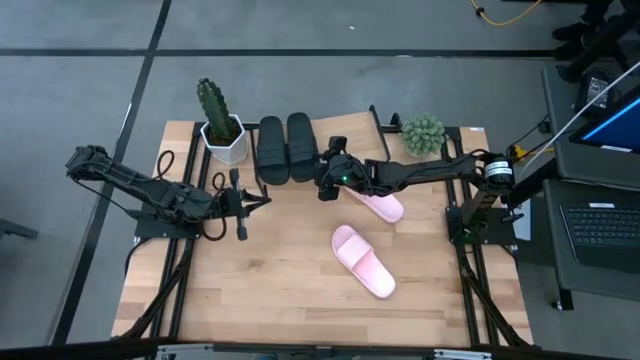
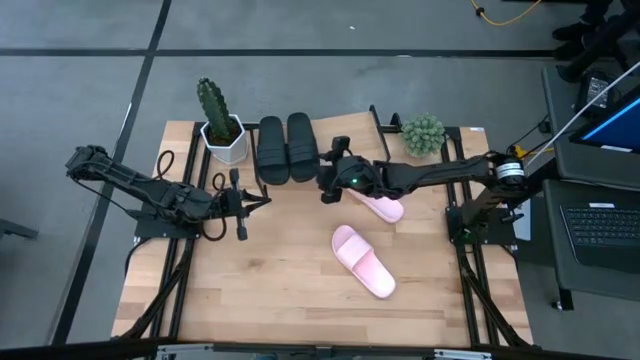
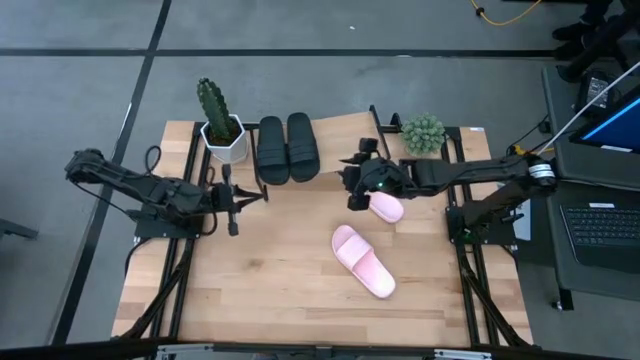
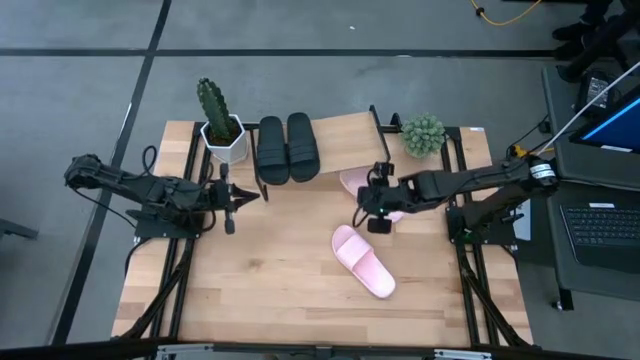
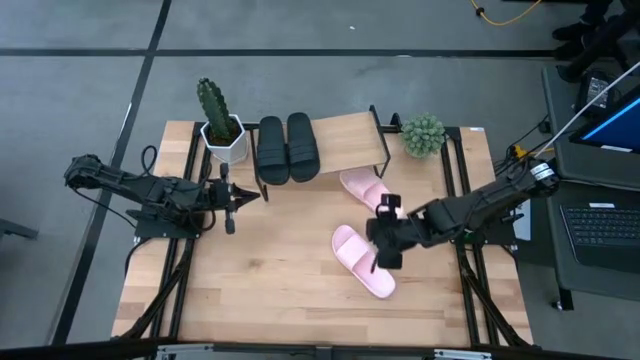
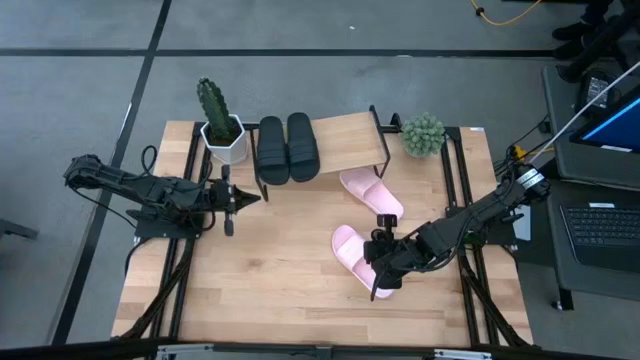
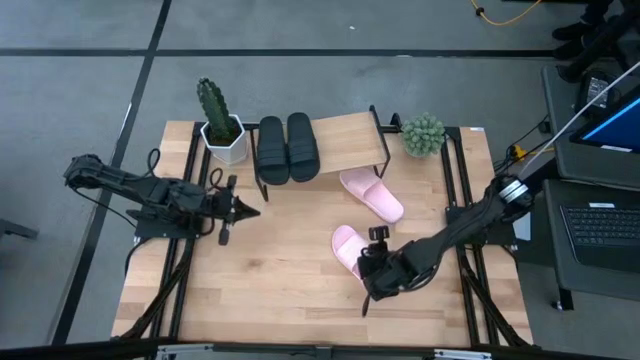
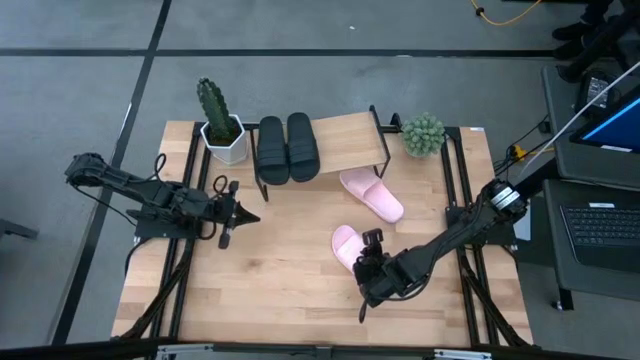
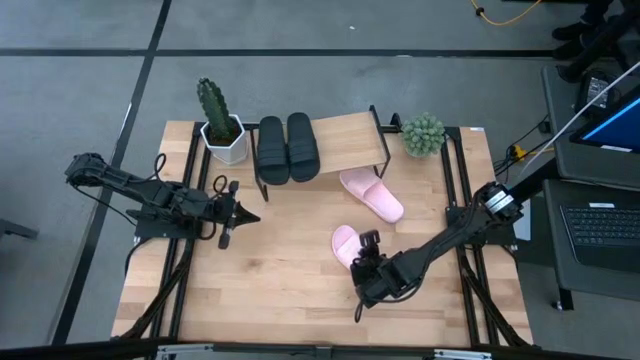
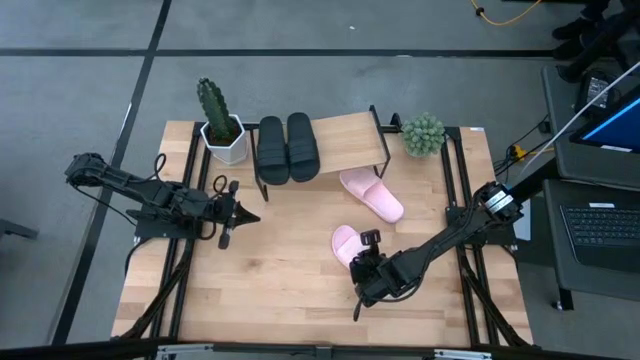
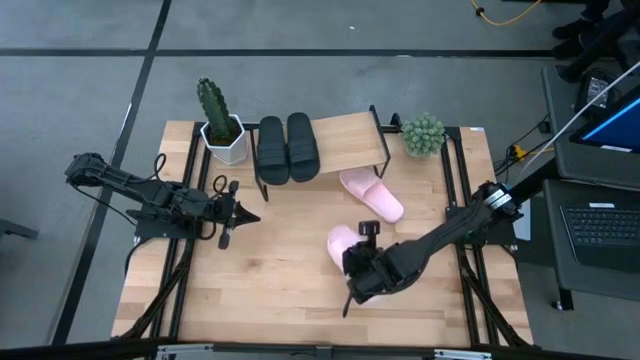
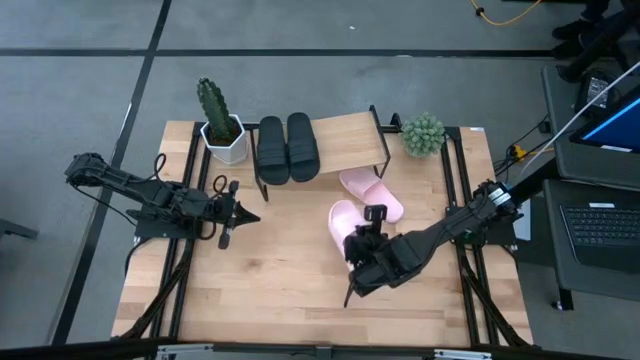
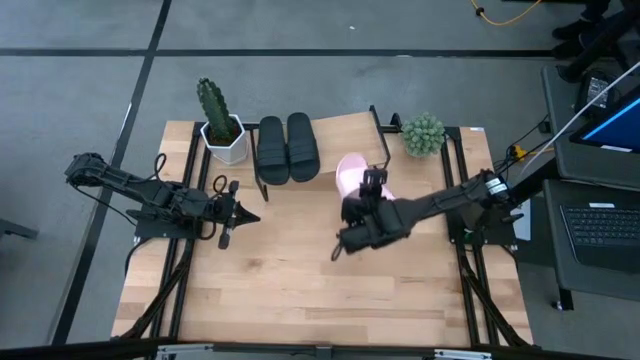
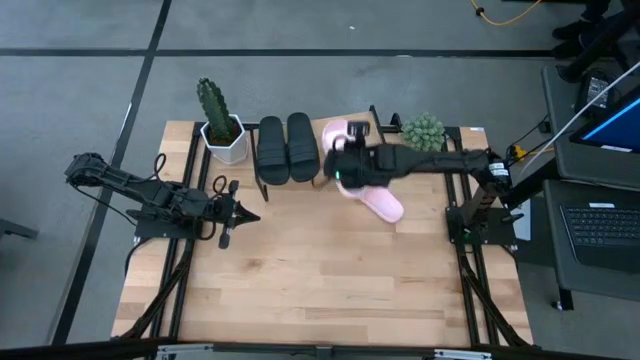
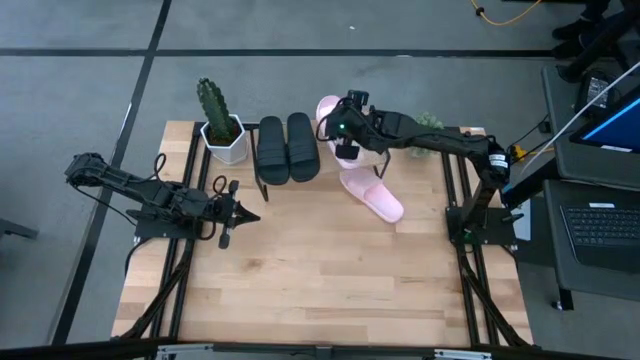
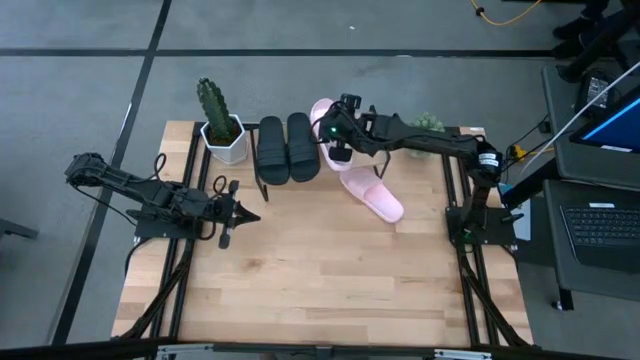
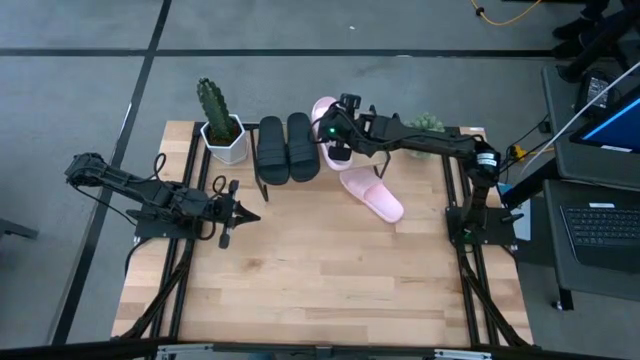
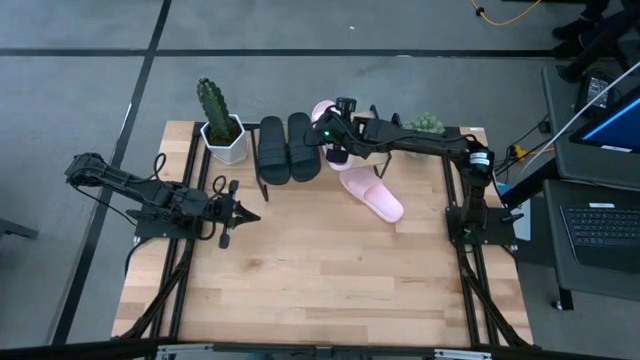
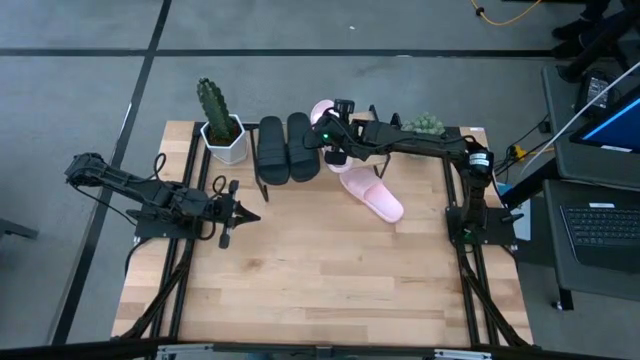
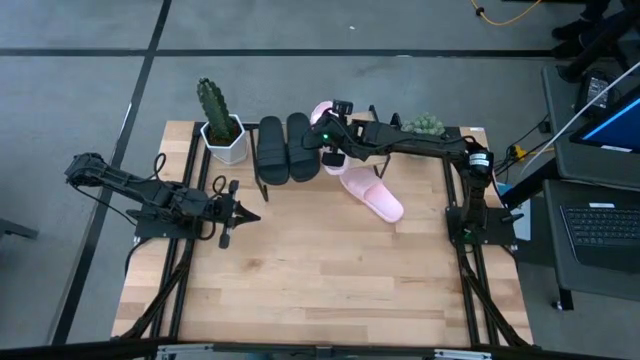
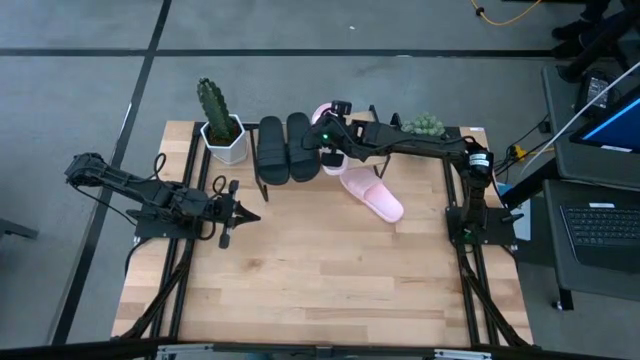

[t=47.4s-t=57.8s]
Task: Pick and place slides into the shelf
Put the bottom pink slide on the shelf

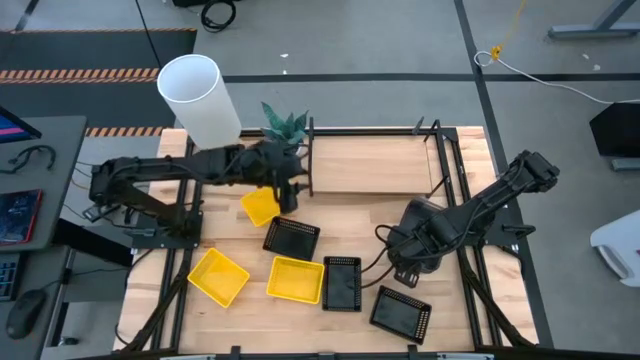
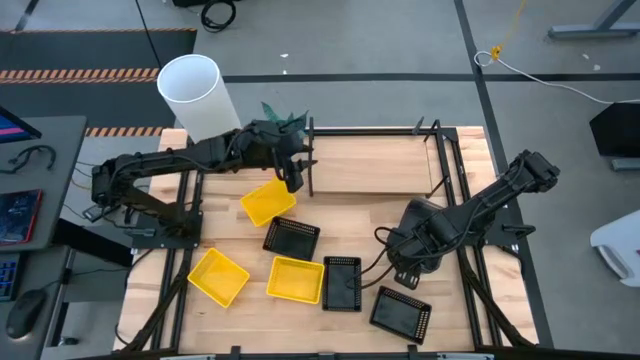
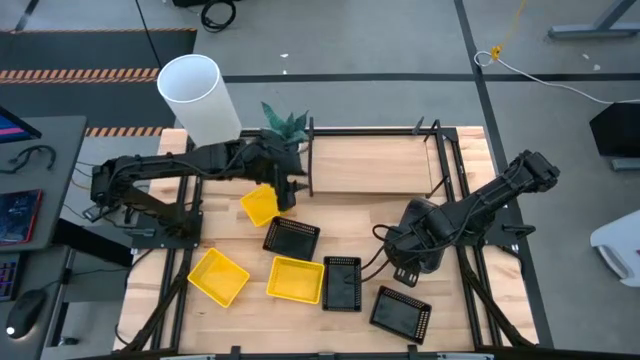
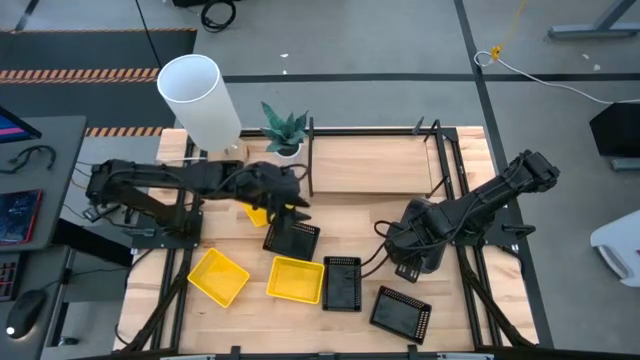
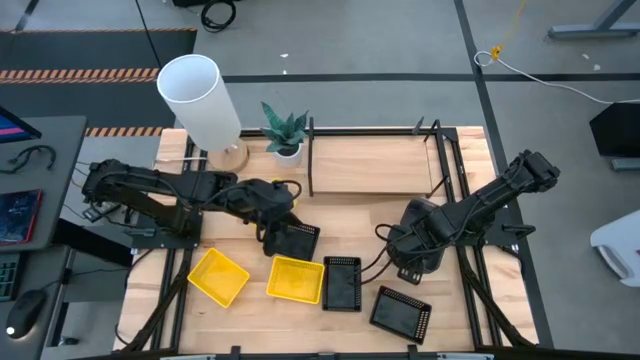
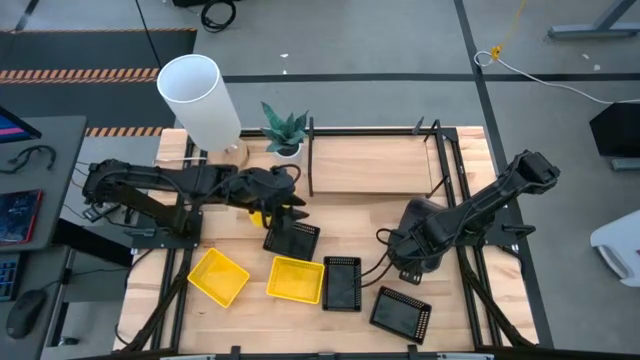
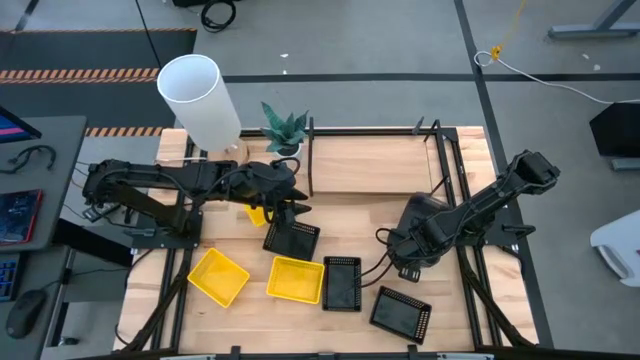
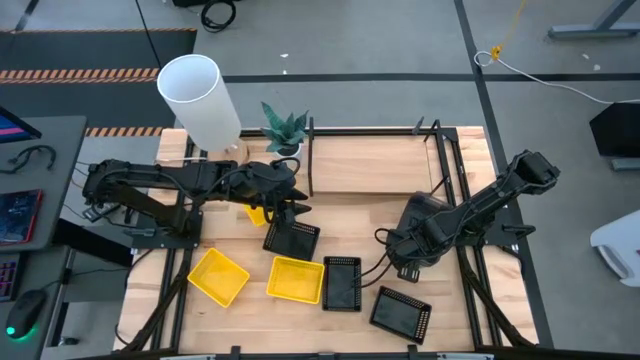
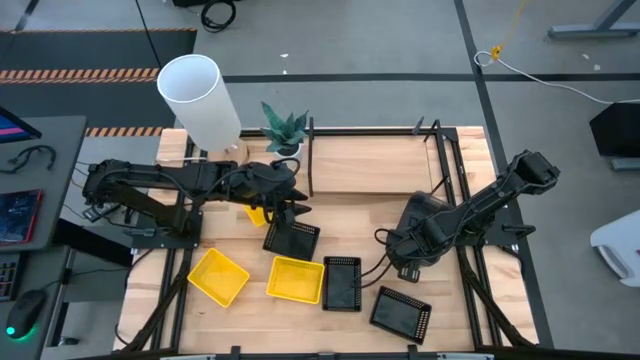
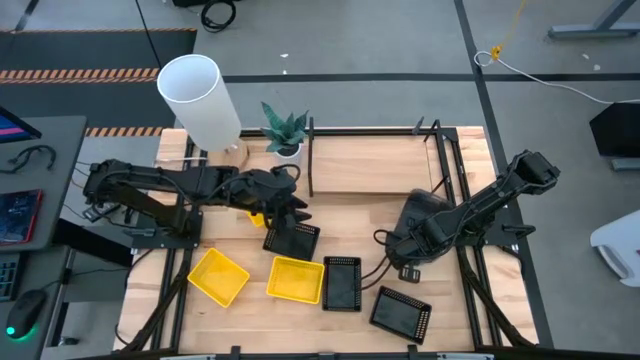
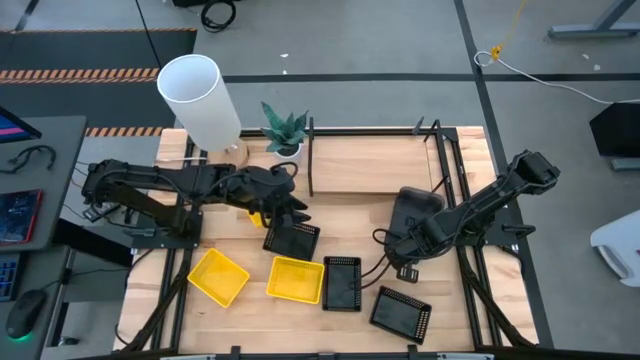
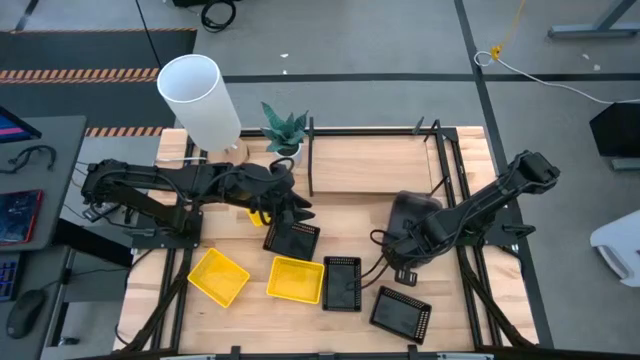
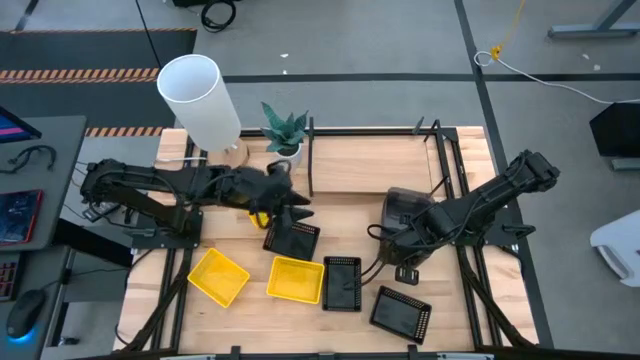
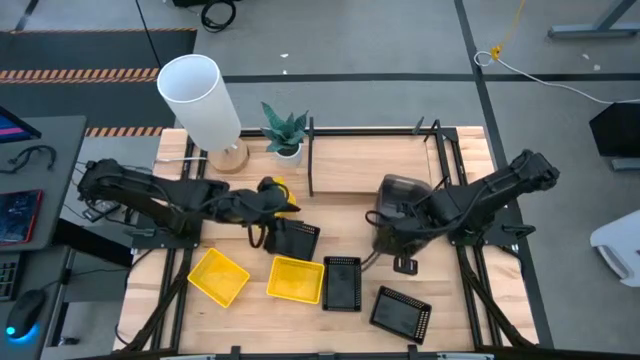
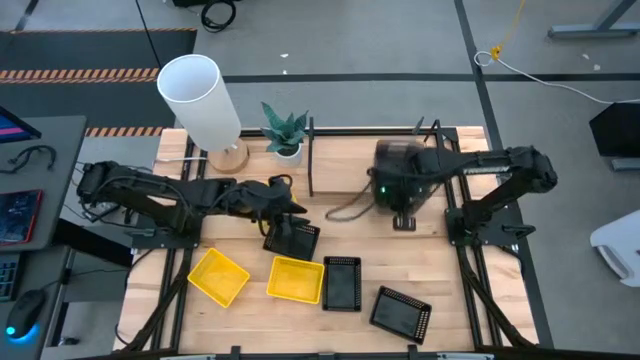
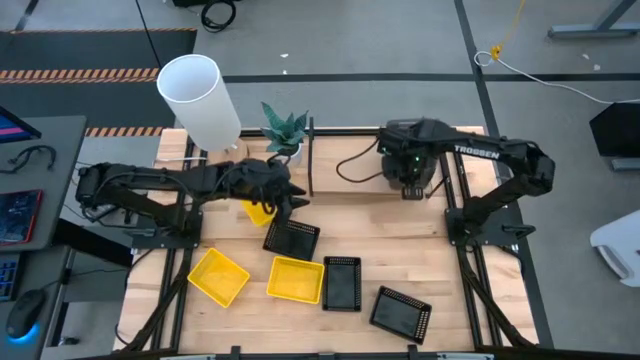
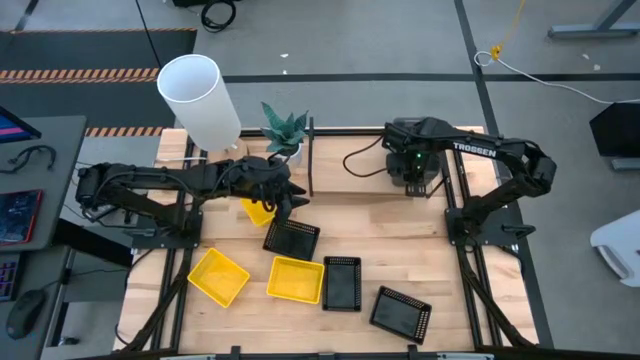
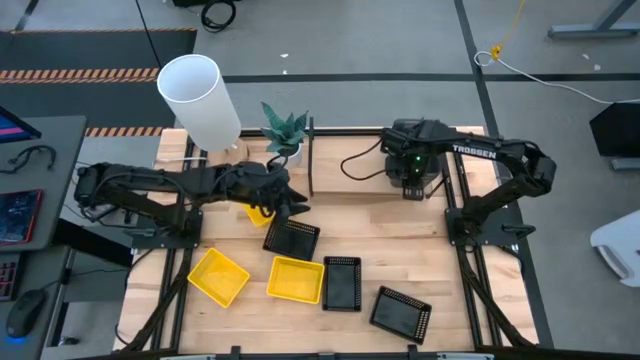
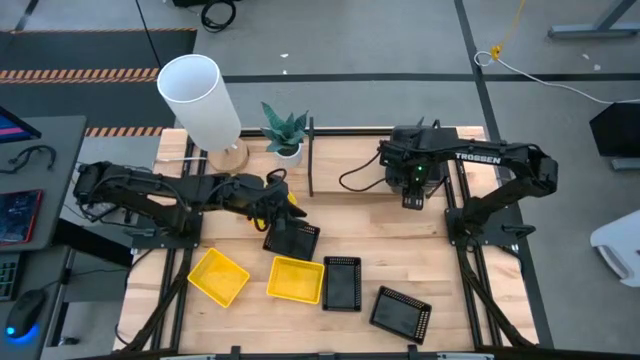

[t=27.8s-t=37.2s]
Task: Stack baskets on shelf by color
Put the stacked black bin on the shelf
